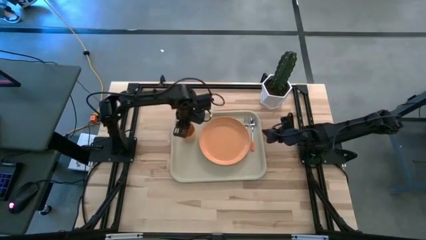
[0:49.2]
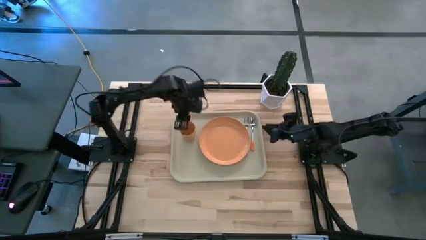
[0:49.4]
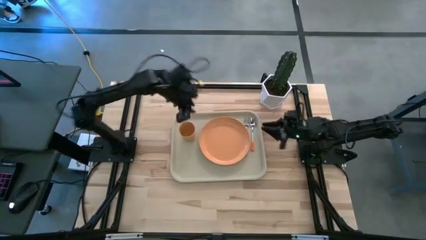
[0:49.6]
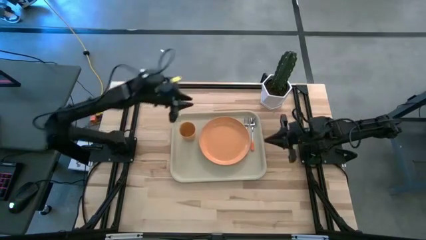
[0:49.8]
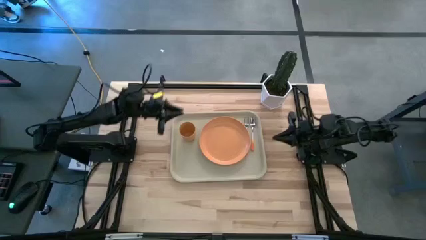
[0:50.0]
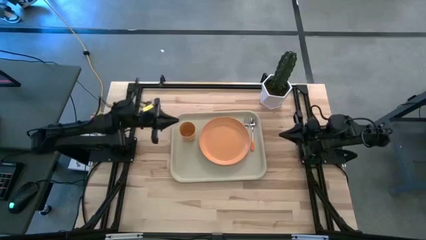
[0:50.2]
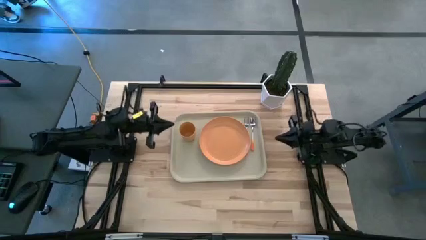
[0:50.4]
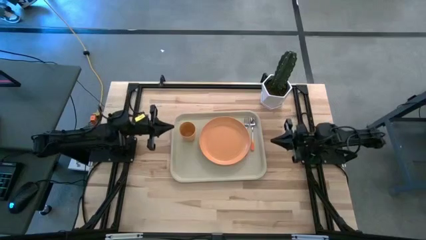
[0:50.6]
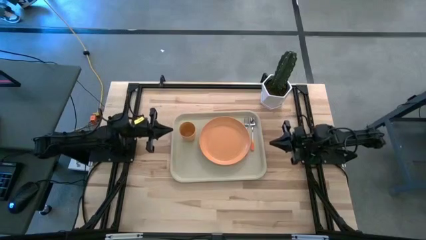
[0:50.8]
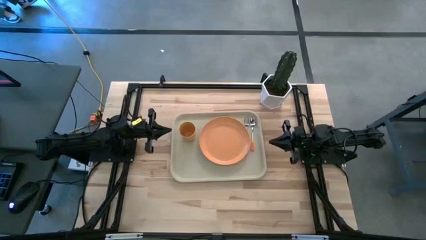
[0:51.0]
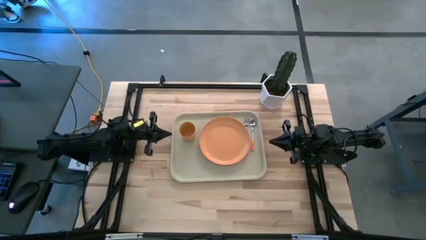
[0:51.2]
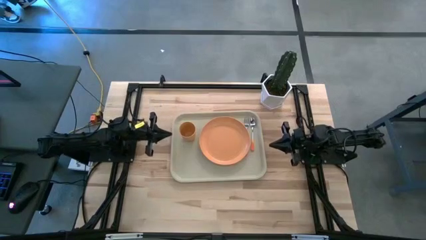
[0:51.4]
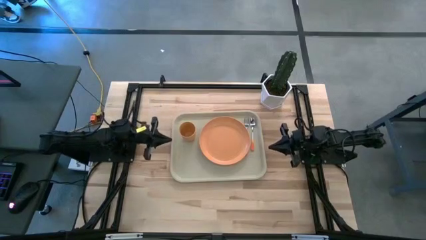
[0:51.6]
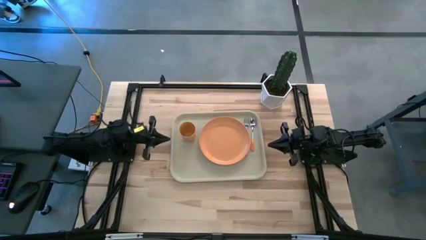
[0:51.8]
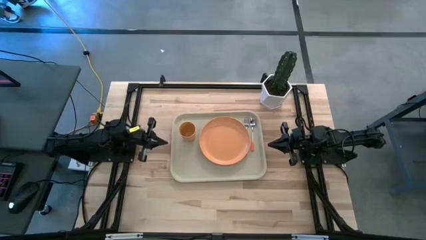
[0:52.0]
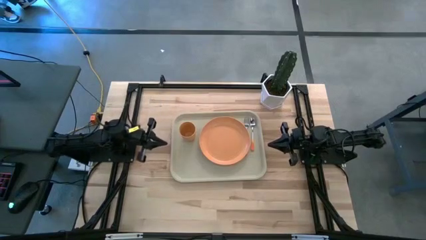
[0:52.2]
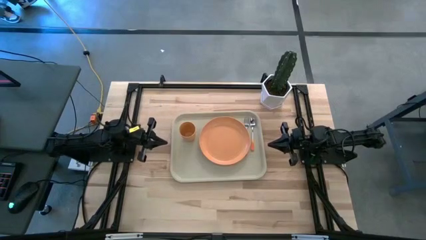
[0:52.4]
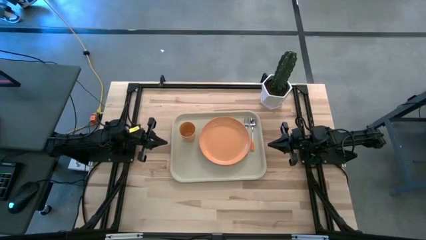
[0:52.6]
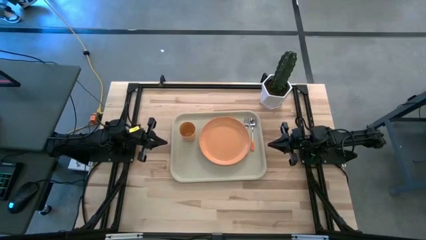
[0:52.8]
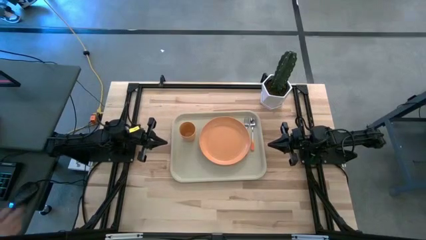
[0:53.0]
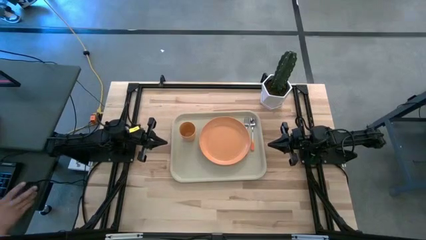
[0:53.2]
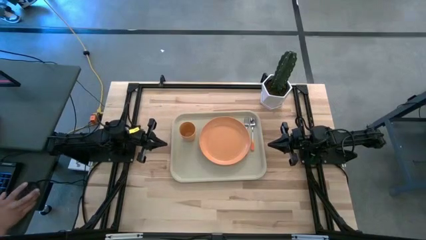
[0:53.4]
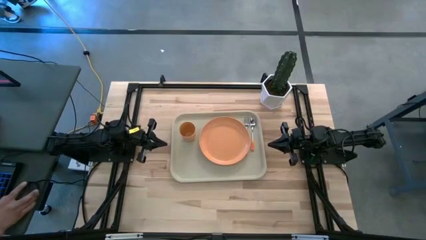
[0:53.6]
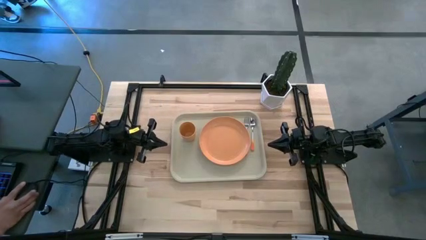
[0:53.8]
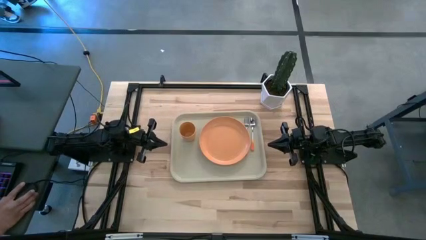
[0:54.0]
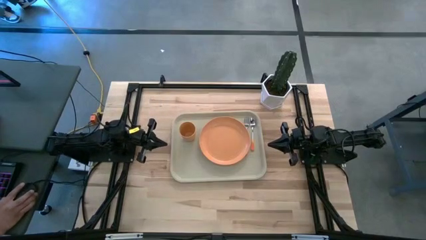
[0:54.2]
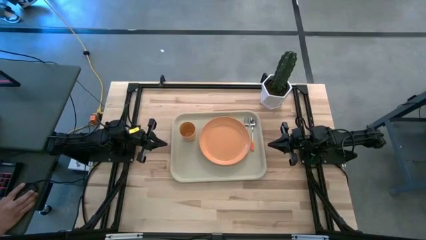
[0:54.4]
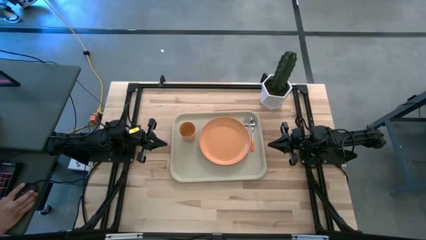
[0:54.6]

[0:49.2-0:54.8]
Task: Pick and place plate/cup/fork/spoon on tray
Return to Home Position

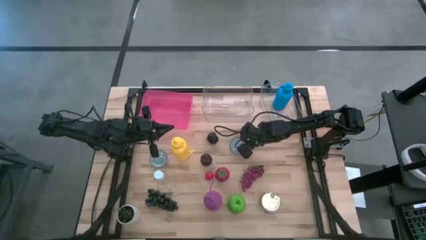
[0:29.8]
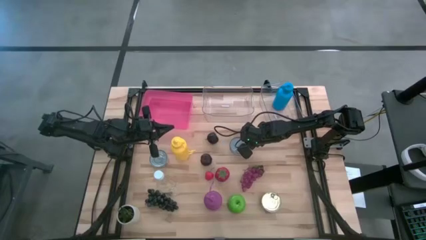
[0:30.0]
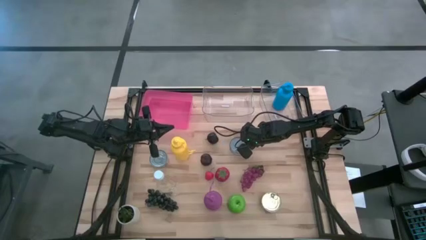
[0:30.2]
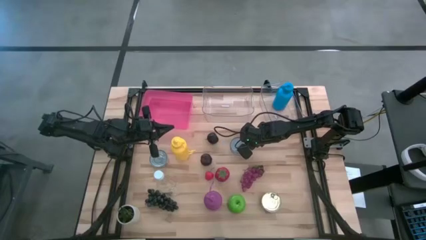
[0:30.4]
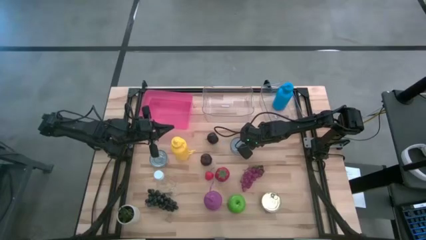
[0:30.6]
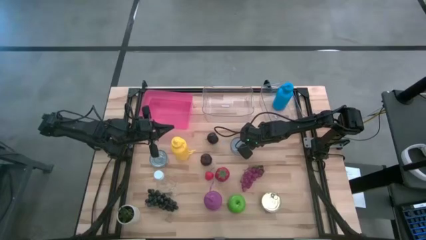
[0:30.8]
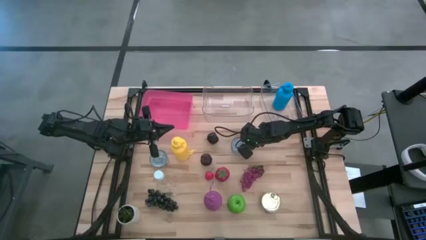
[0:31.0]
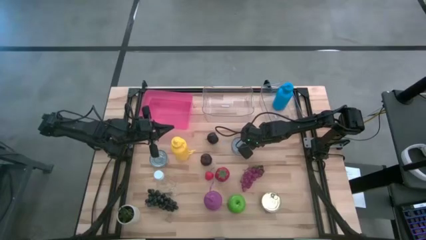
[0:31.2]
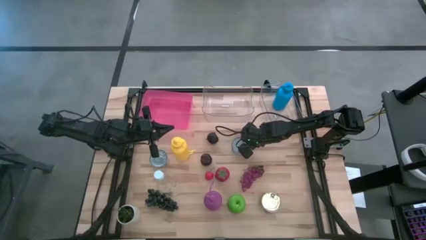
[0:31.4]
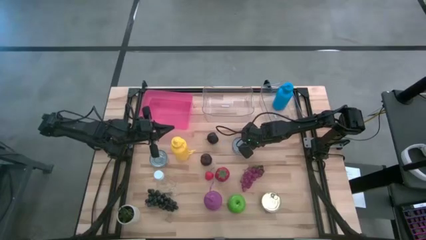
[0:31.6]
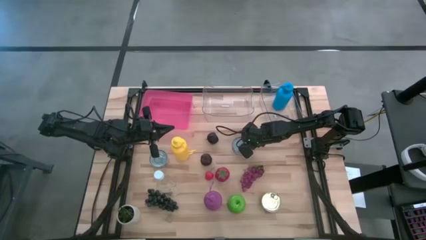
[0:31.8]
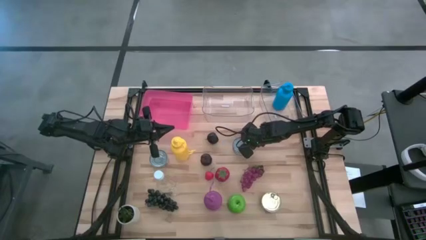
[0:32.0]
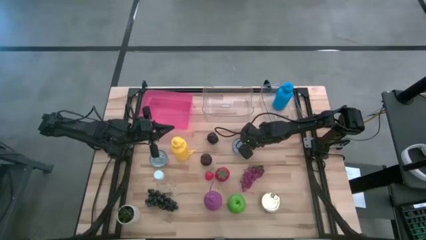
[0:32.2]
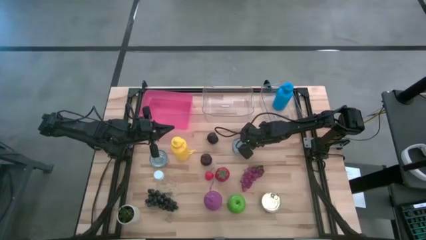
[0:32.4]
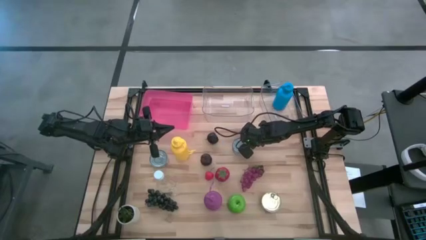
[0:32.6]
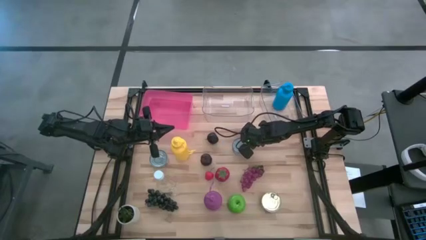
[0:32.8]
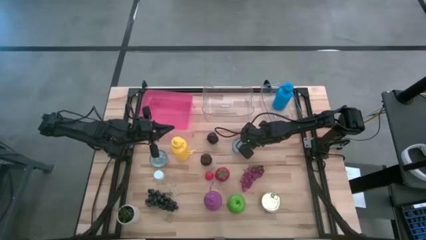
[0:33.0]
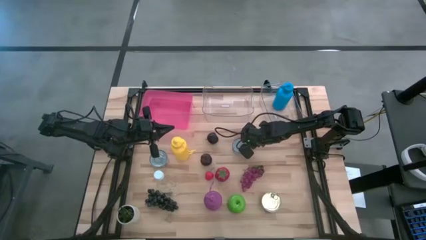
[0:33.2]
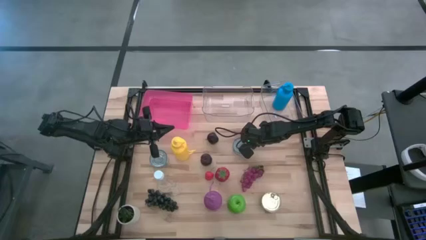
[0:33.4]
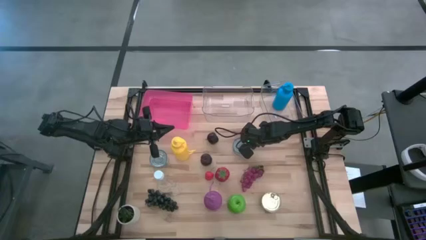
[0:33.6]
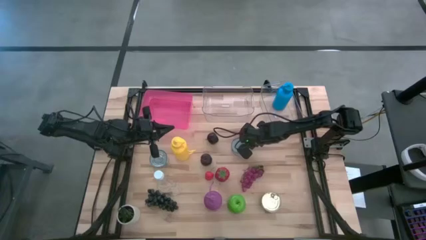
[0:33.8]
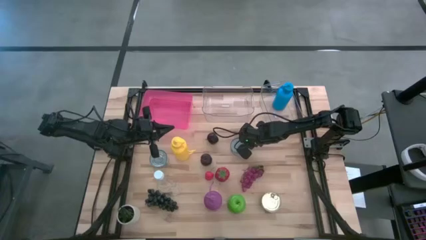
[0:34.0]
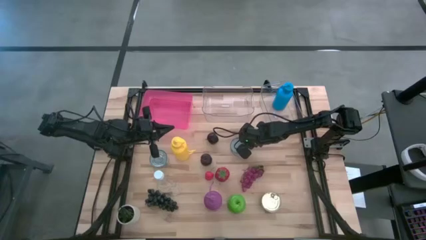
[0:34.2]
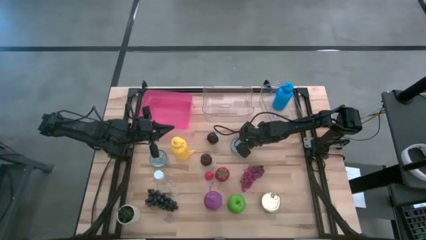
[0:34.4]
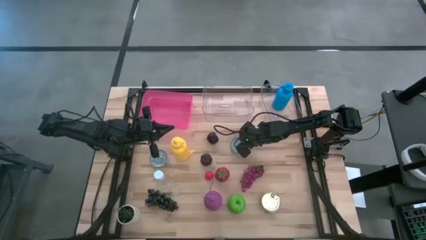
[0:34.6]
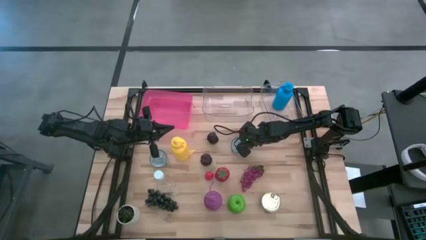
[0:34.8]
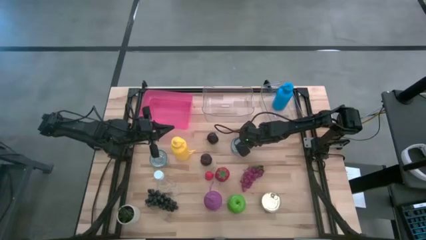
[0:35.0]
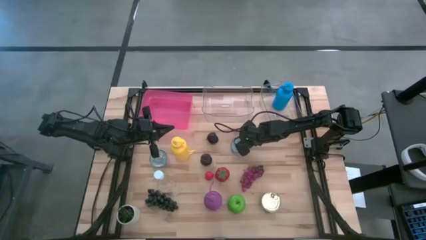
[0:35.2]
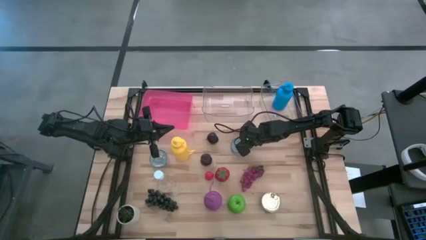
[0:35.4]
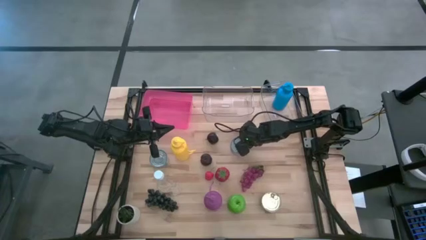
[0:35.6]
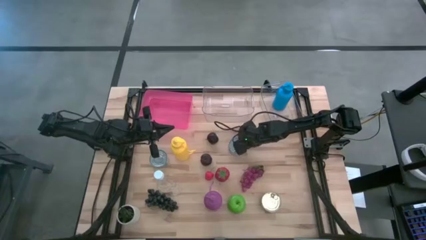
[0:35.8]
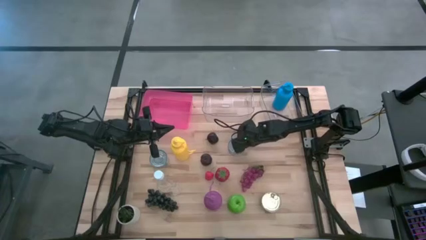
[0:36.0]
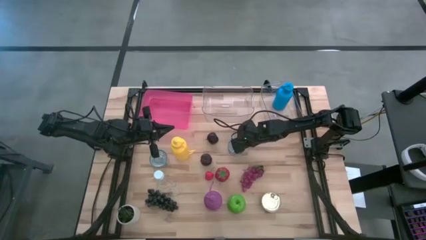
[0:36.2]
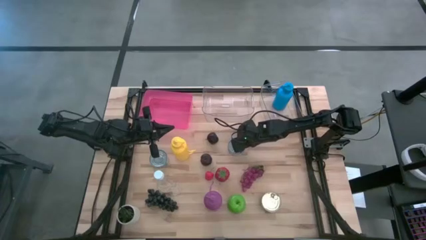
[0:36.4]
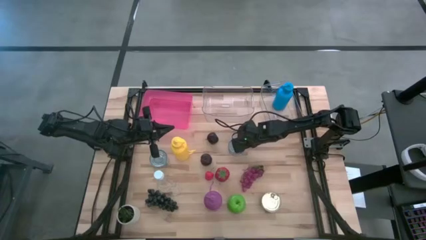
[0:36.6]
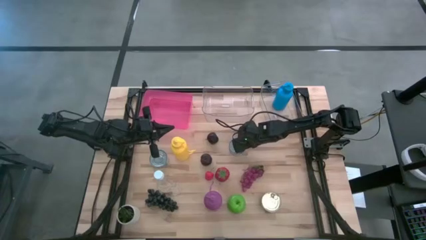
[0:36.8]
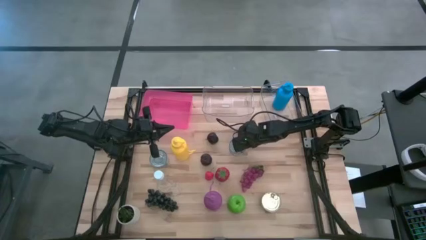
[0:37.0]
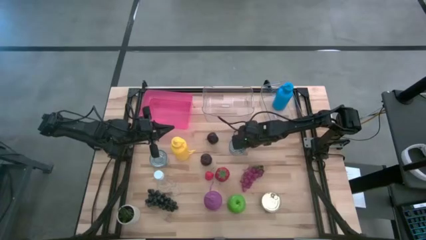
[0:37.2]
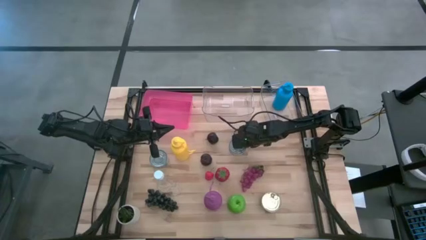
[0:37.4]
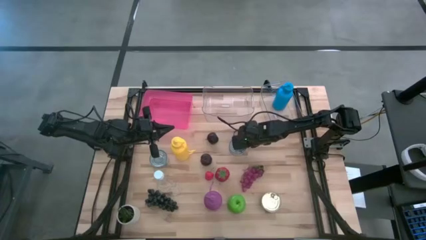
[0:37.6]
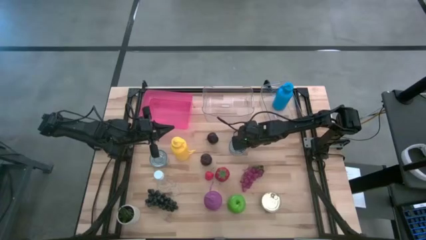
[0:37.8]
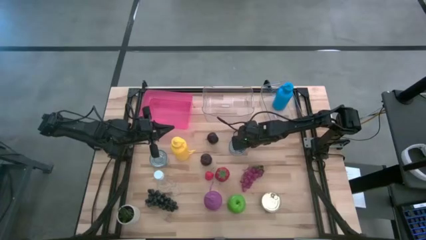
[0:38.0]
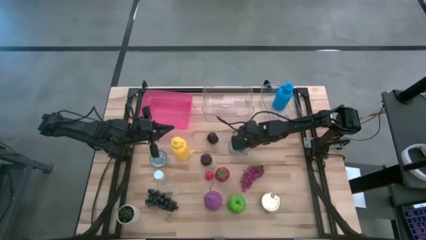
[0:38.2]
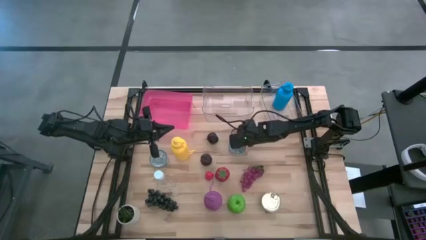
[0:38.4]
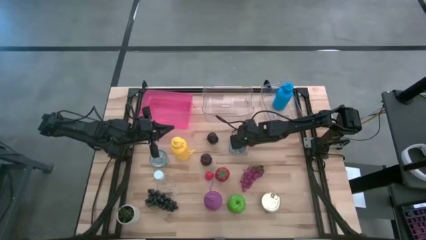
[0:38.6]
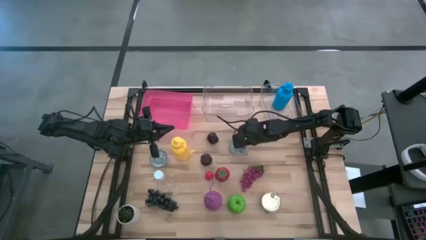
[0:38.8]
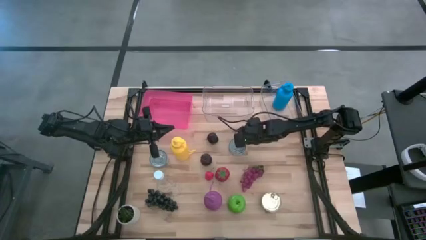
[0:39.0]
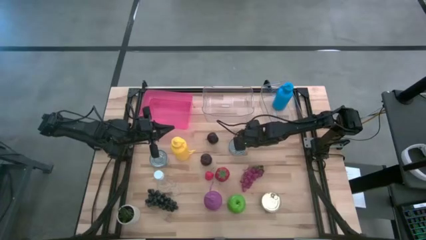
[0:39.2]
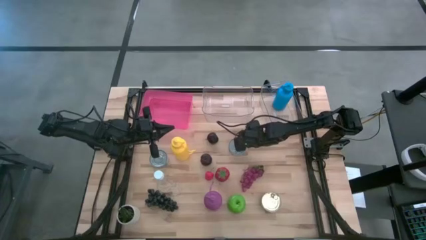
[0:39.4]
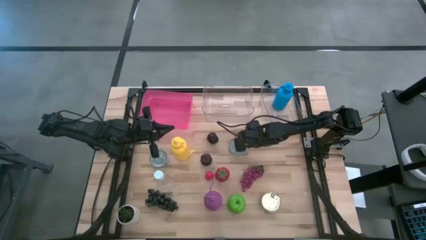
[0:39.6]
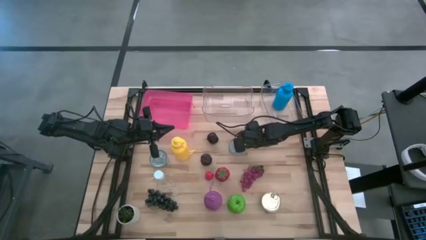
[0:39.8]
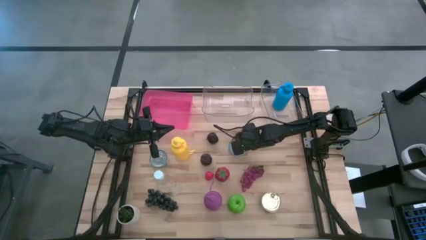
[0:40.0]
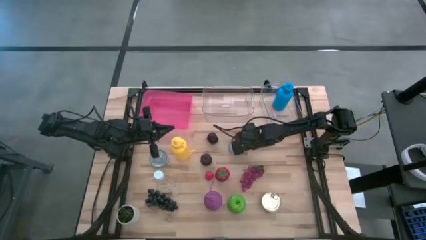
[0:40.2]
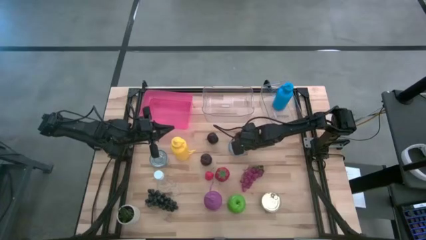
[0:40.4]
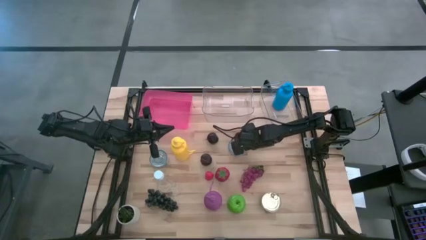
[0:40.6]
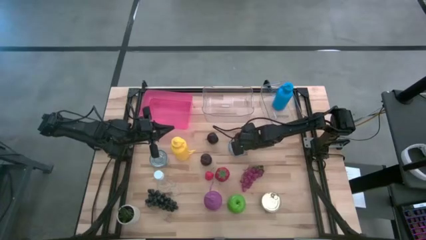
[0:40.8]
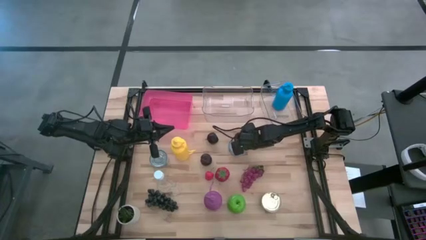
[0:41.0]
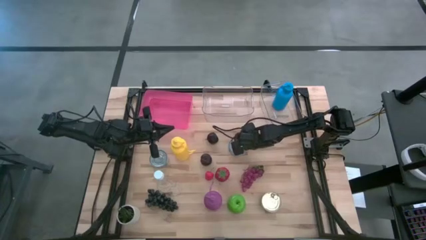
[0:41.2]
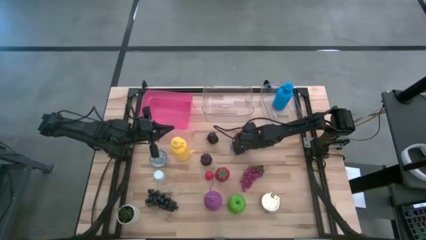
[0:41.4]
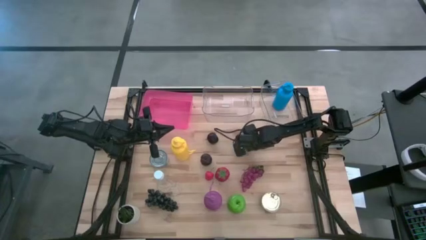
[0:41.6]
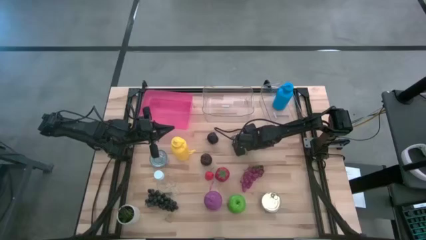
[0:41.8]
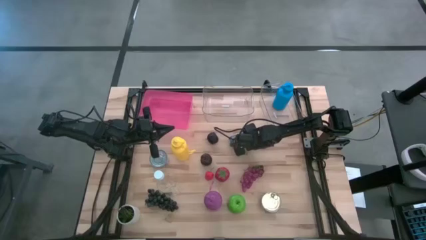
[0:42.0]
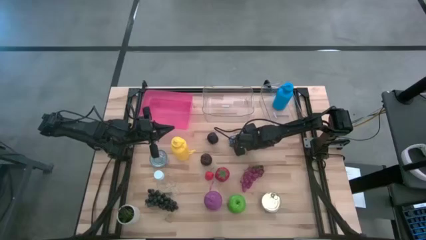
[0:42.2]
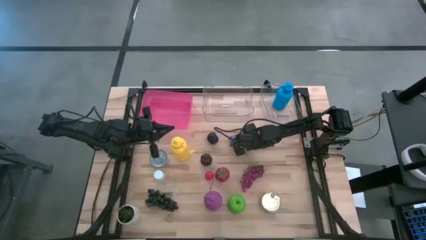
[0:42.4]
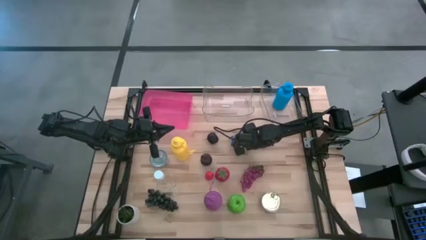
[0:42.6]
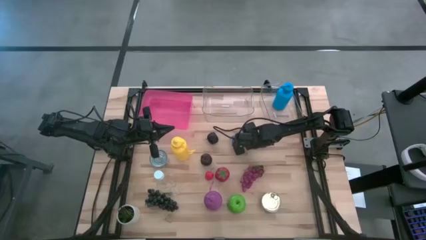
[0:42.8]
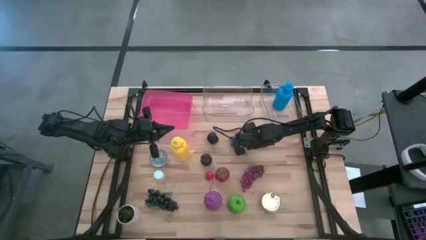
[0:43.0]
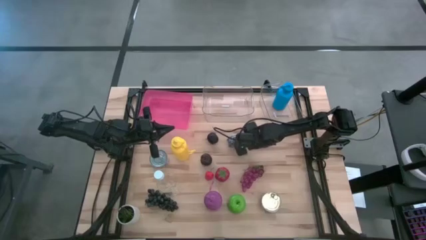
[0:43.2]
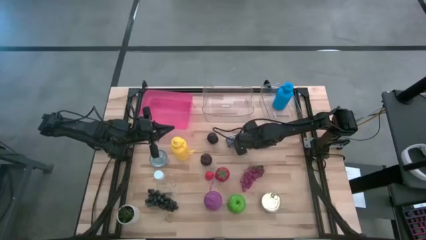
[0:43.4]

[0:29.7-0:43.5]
Task: Pick & Place Food Item
Put the dark blue tuna can into the left transparent bin
